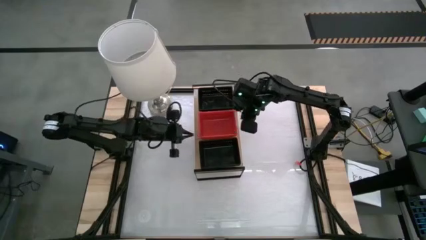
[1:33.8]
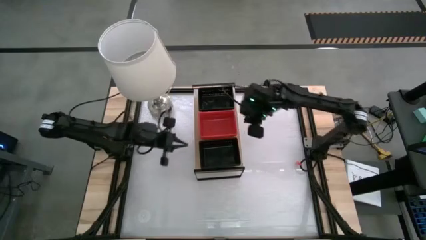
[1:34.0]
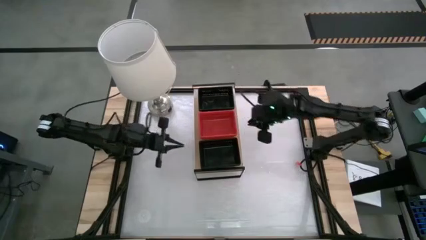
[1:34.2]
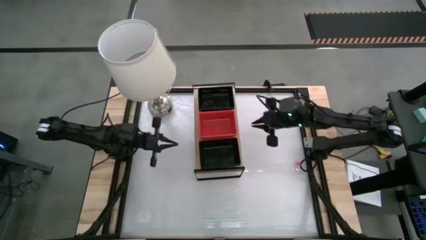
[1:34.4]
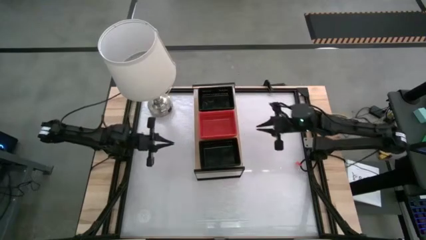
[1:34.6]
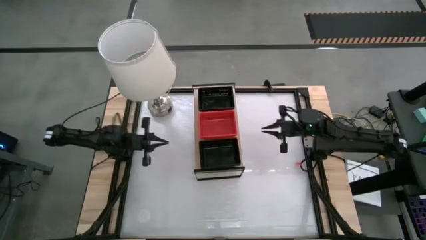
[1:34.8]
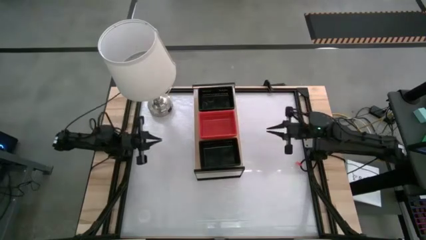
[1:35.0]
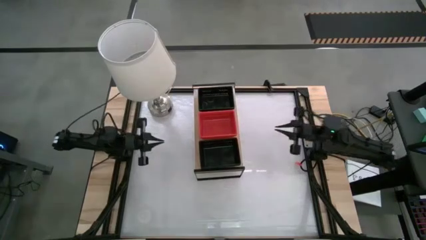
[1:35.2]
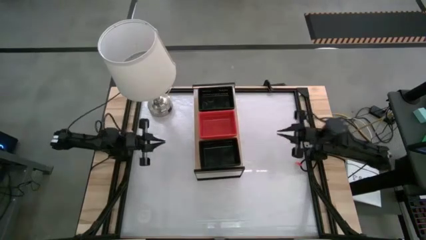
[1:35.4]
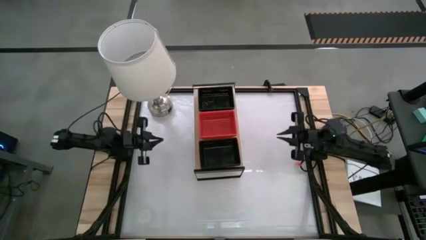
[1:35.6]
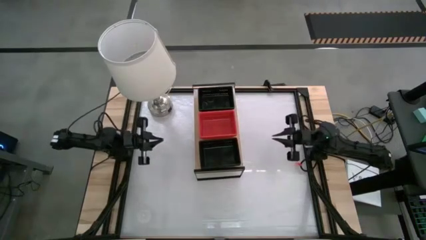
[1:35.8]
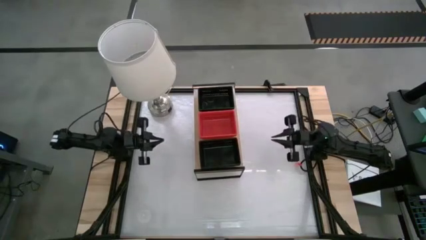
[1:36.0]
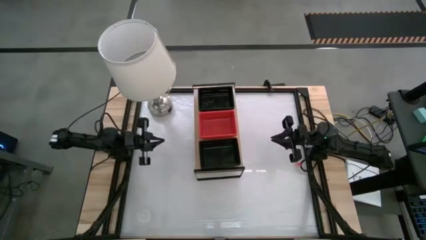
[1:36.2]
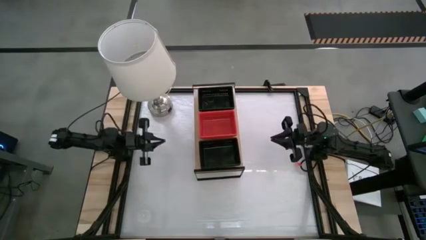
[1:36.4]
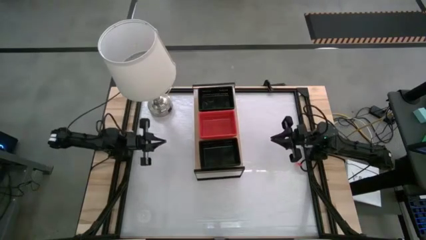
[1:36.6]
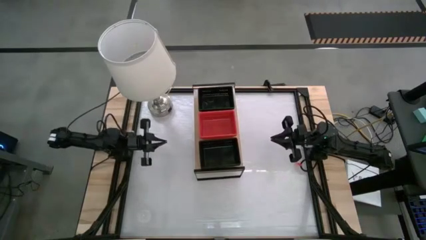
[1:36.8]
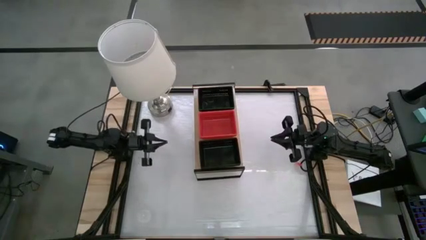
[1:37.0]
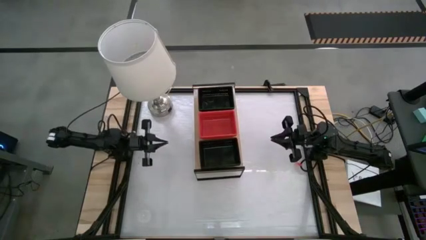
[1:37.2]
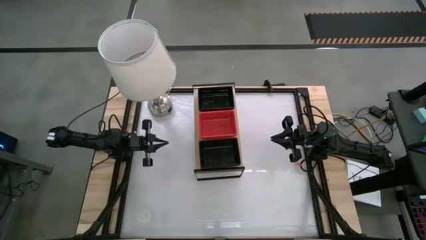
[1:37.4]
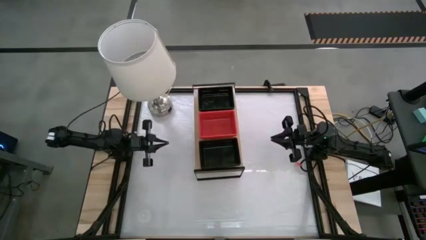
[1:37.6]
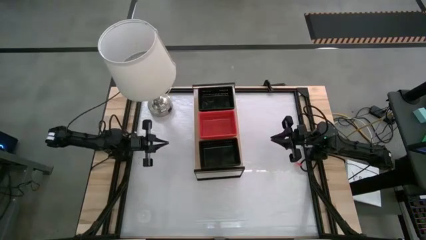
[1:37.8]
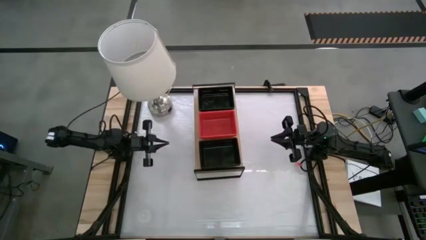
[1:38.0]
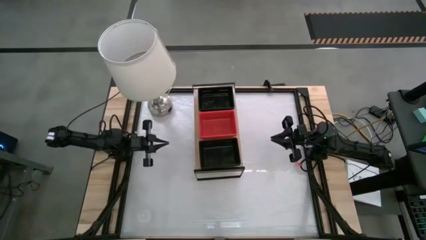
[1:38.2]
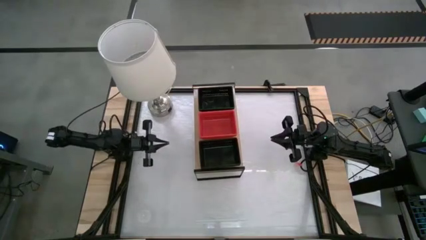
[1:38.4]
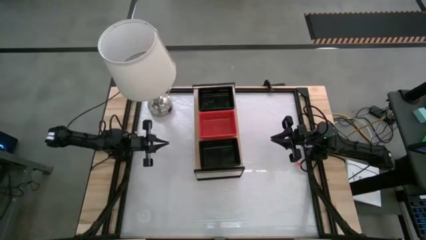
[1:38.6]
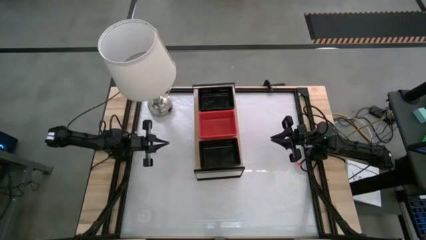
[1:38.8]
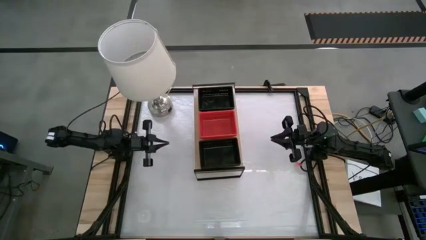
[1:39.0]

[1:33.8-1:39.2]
Task: Stack baskets on shelf by color
Return to Home Position

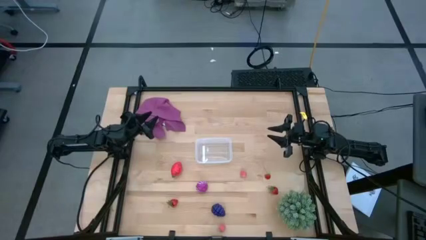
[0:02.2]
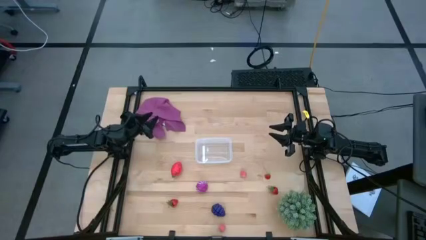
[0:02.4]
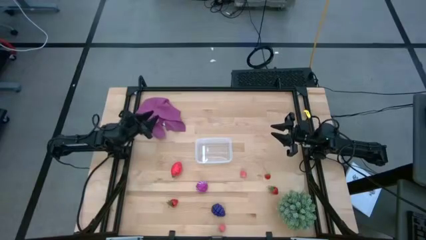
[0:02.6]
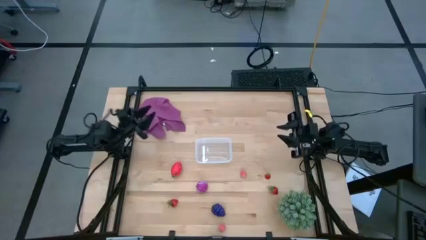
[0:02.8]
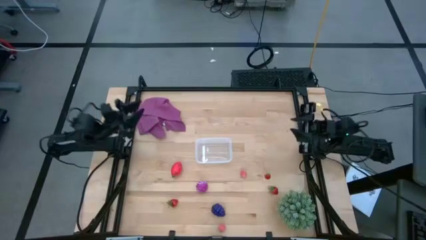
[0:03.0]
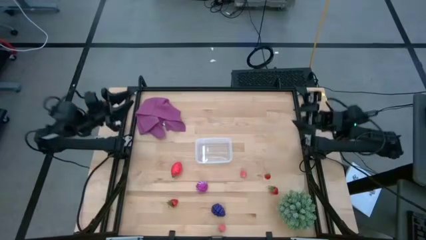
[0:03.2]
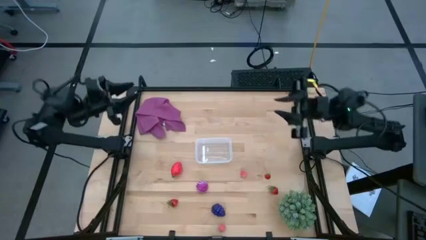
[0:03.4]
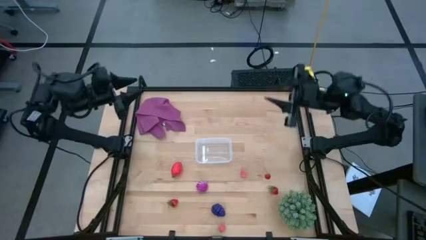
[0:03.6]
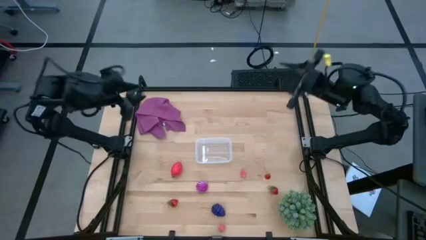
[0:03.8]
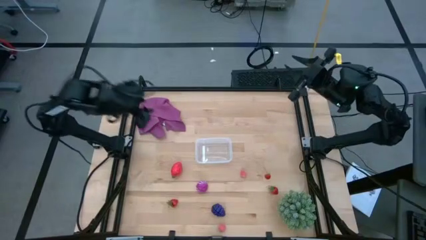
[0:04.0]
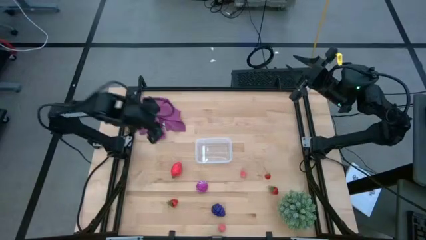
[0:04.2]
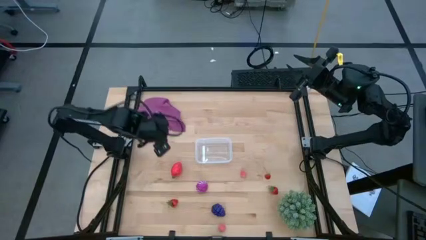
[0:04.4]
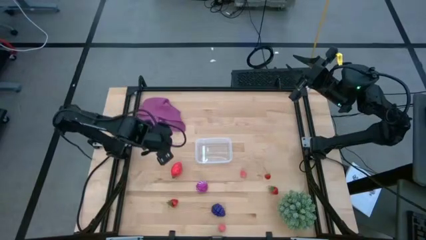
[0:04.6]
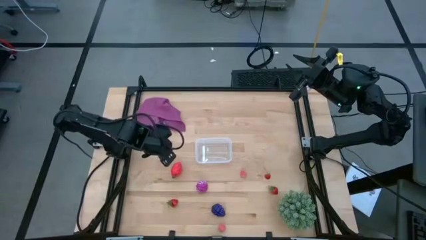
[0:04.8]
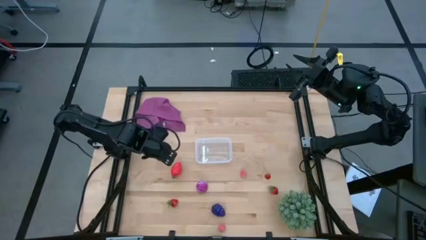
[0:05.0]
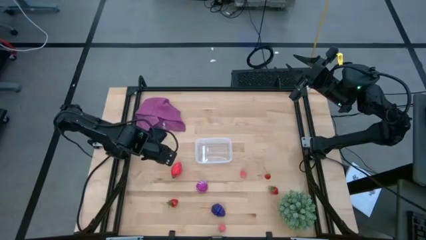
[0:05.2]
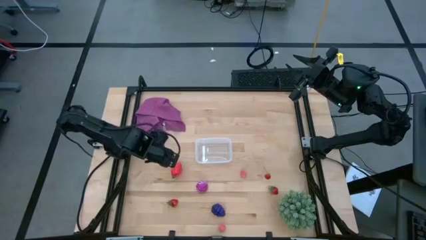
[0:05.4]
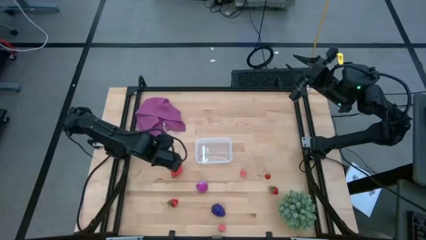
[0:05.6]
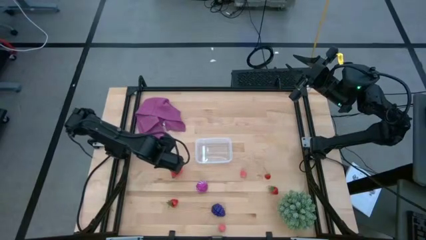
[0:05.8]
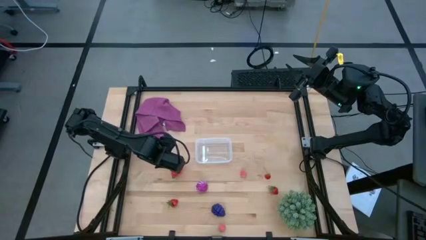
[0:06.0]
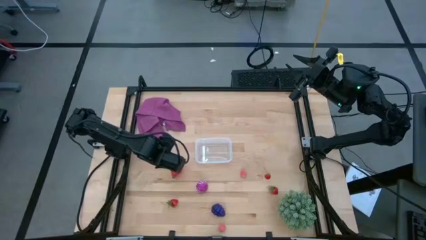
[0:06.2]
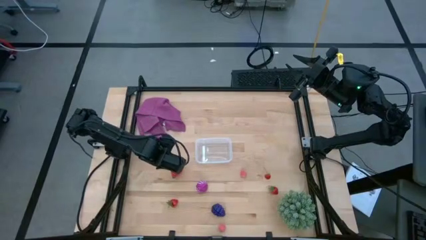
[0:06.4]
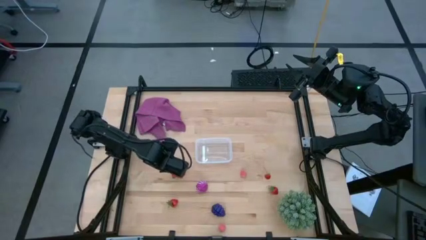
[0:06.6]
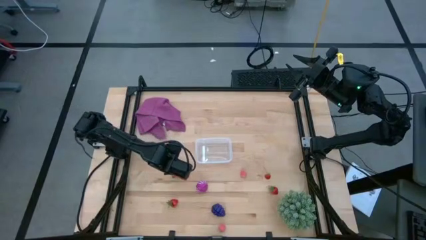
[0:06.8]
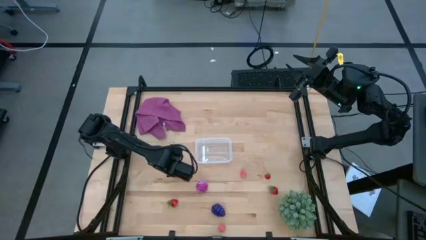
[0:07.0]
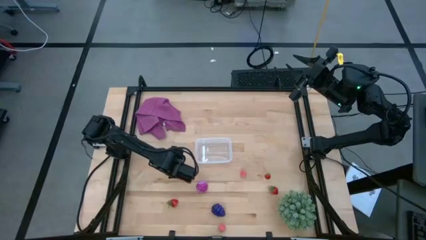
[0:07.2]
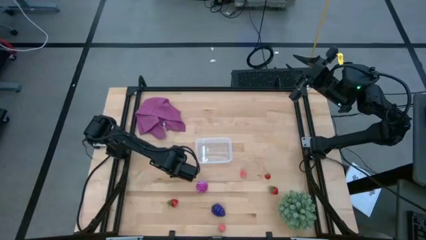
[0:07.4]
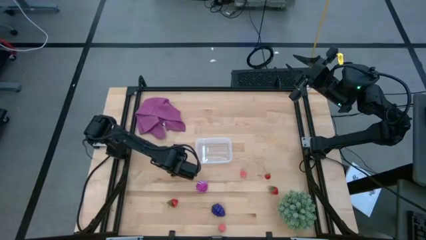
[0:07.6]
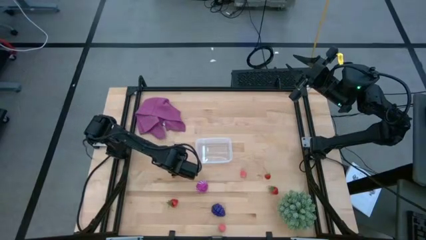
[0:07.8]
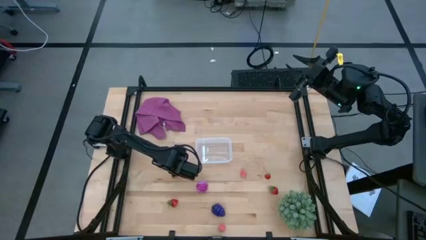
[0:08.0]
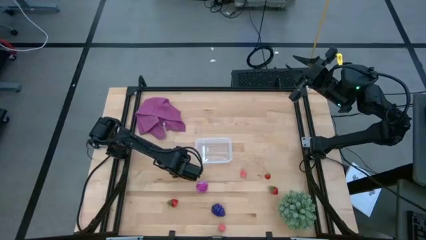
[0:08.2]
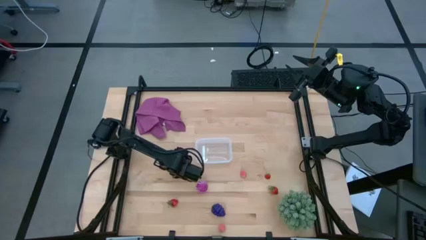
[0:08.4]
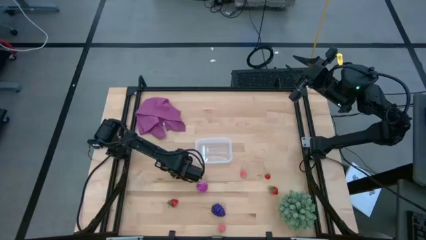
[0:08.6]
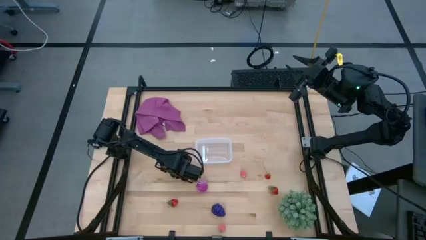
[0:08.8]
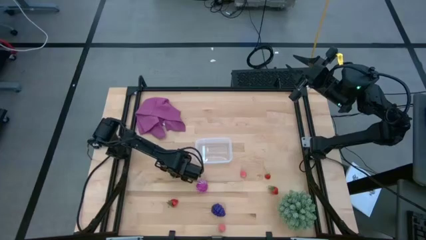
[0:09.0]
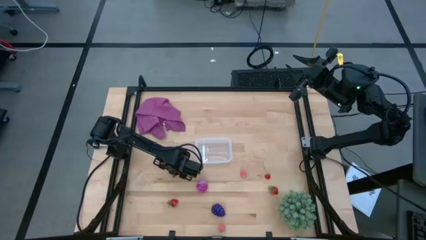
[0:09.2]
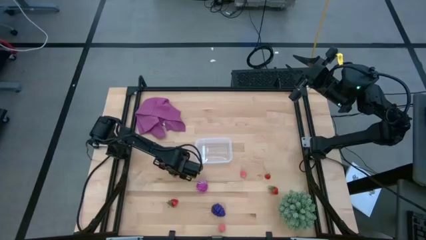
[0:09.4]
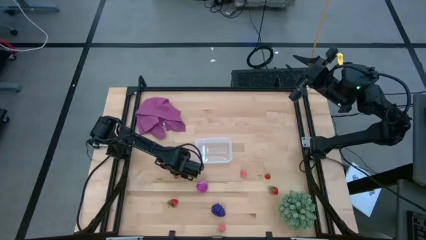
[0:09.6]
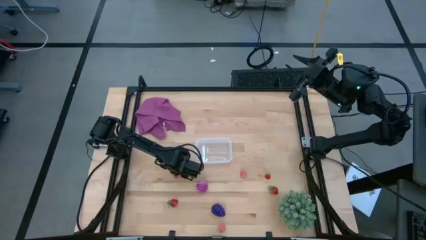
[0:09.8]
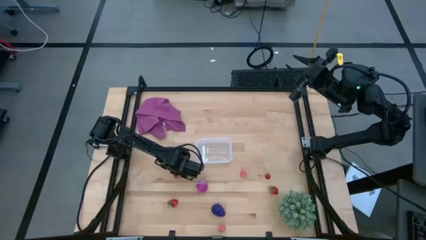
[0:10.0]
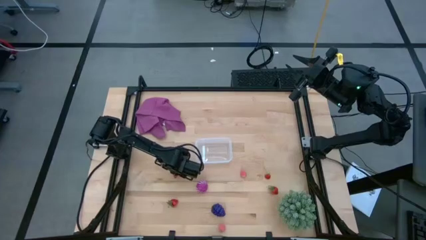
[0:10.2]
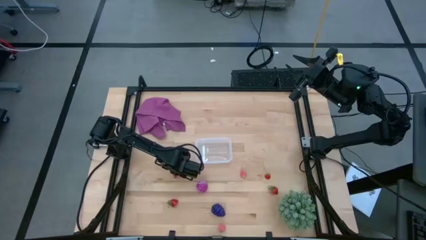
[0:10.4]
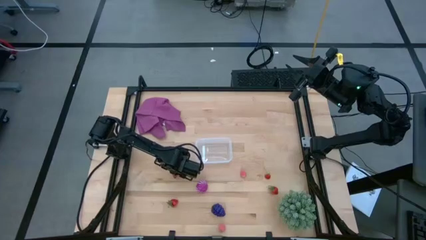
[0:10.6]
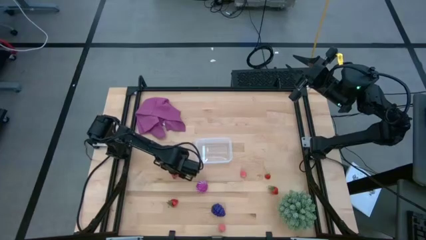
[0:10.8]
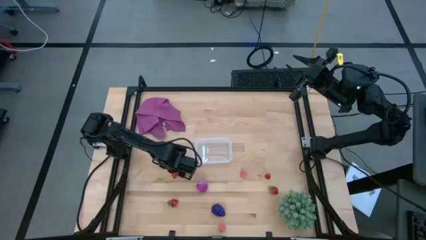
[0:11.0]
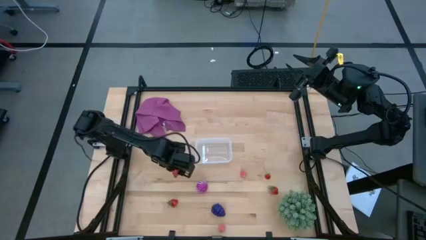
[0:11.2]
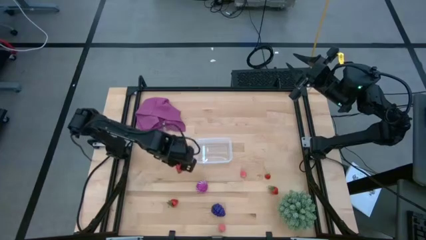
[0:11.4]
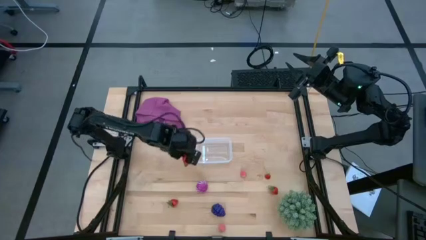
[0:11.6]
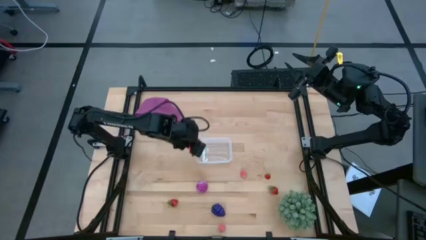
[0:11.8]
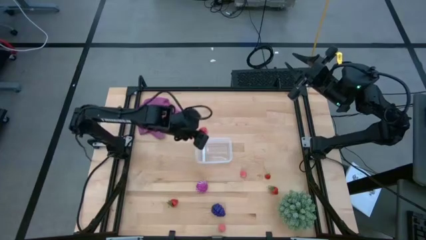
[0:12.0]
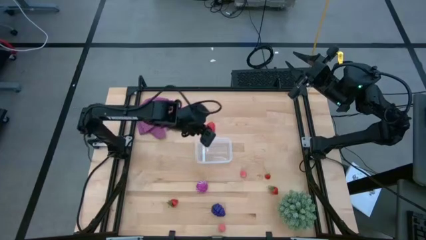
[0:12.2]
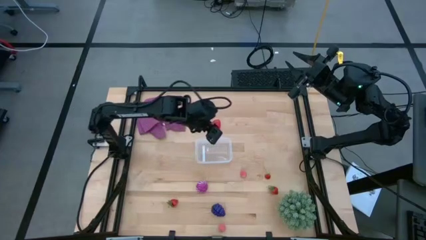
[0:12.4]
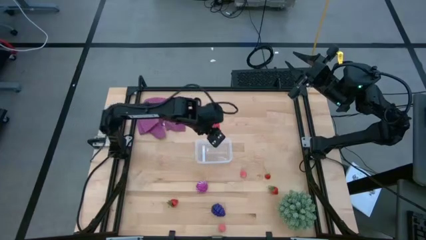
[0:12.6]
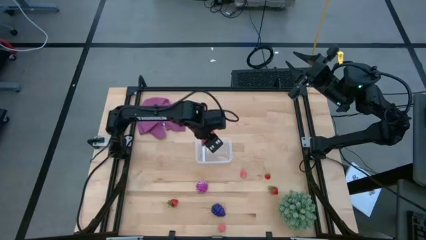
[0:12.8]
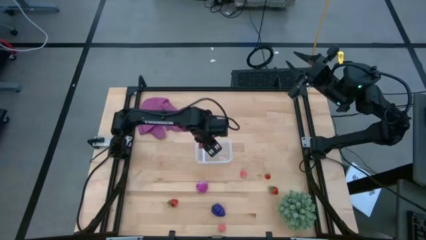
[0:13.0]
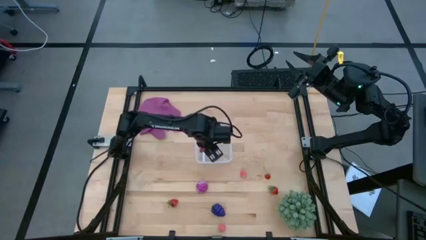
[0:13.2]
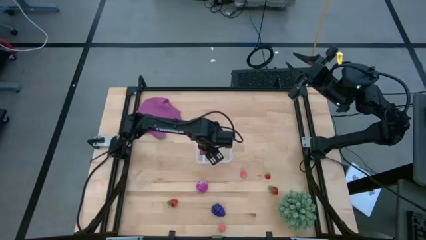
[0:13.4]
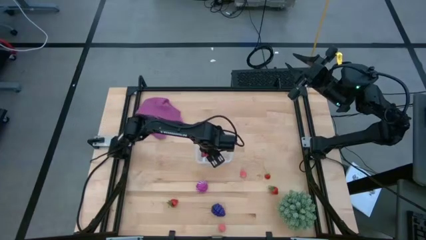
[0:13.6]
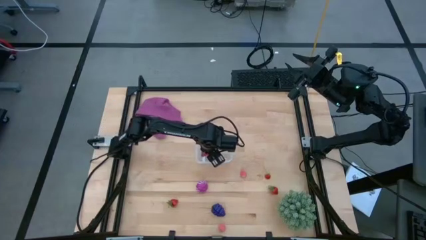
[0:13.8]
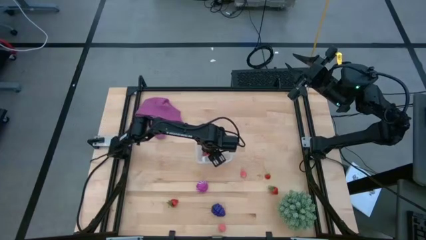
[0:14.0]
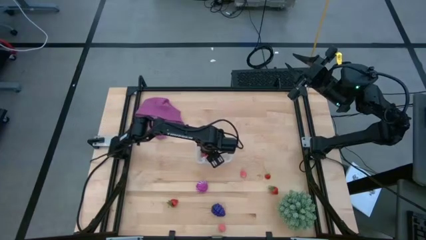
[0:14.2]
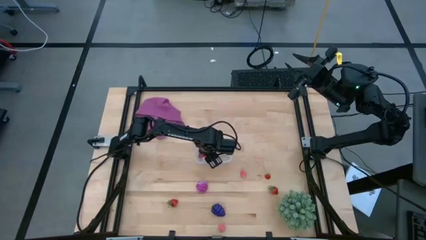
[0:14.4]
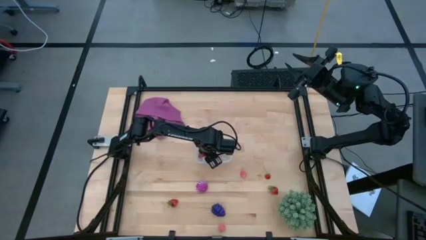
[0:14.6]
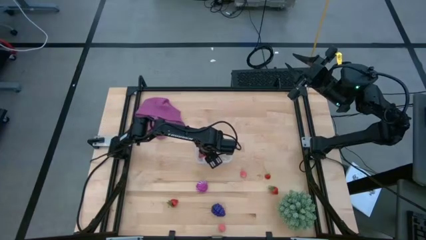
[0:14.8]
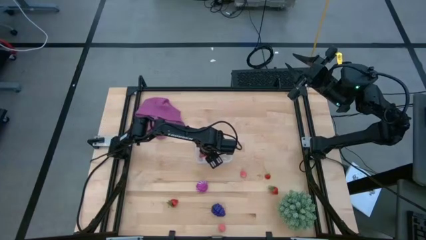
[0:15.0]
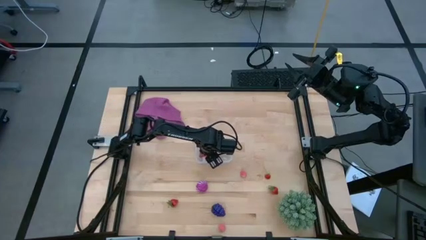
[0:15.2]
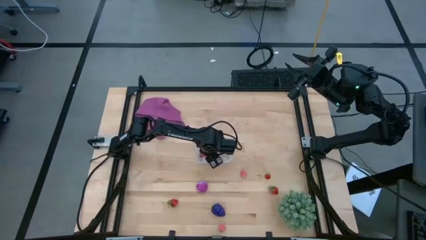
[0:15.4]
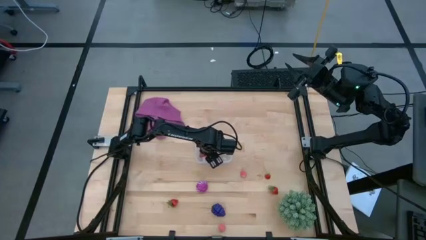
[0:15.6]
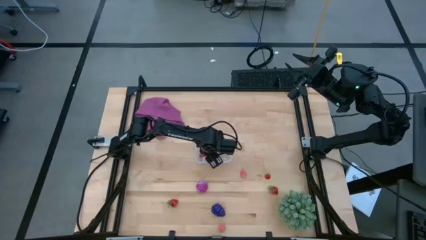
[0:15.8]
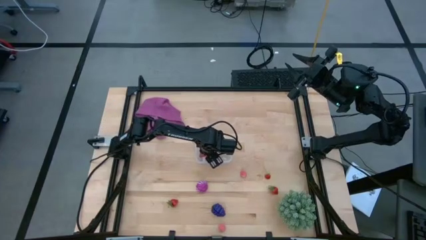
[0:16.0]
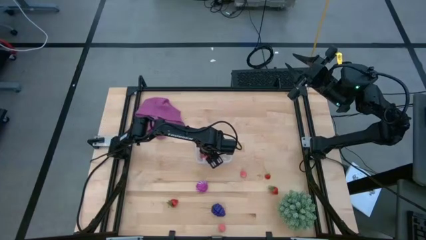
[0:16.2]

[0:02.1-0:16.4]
Task: Pick and placing Produce into tupperware
Put the red dragon fruit into the transparent bin
